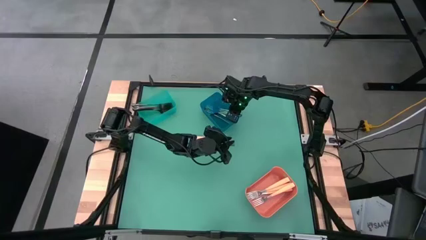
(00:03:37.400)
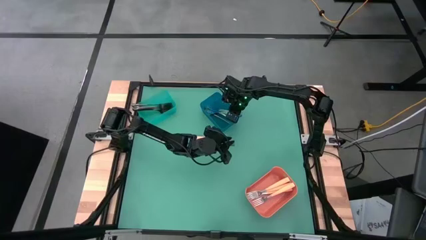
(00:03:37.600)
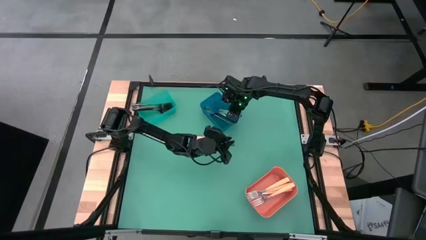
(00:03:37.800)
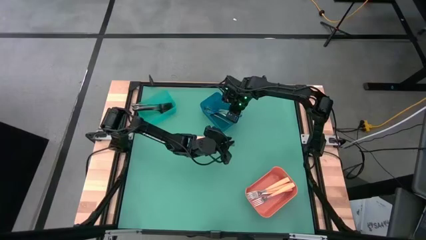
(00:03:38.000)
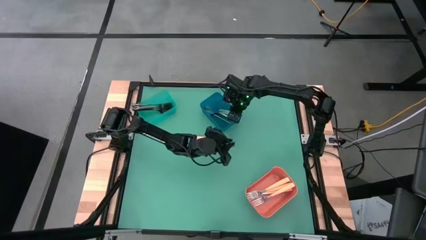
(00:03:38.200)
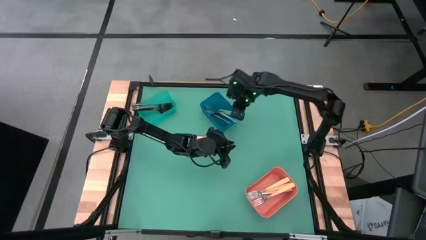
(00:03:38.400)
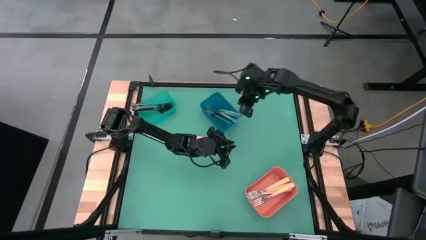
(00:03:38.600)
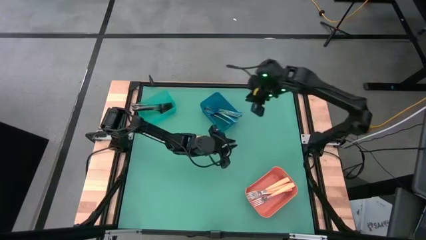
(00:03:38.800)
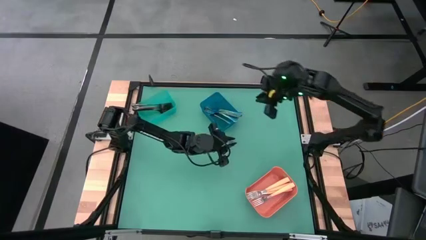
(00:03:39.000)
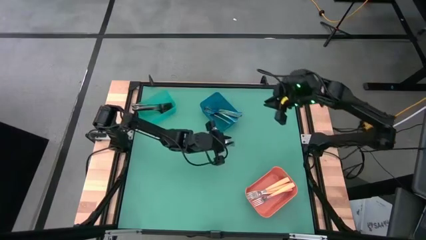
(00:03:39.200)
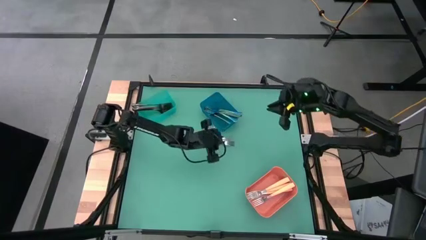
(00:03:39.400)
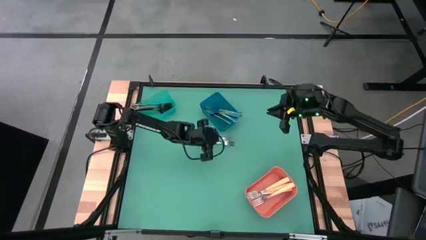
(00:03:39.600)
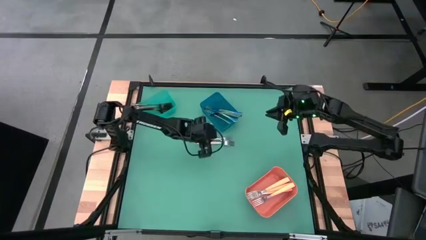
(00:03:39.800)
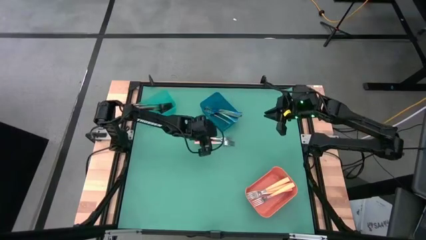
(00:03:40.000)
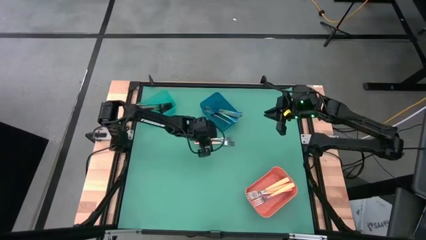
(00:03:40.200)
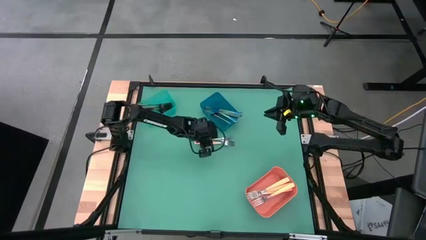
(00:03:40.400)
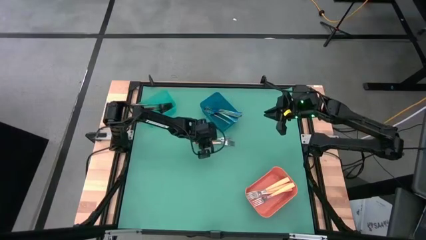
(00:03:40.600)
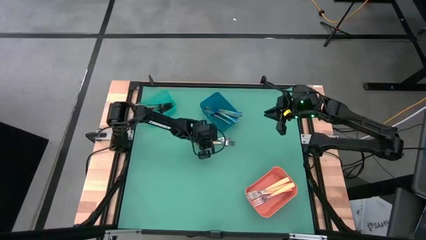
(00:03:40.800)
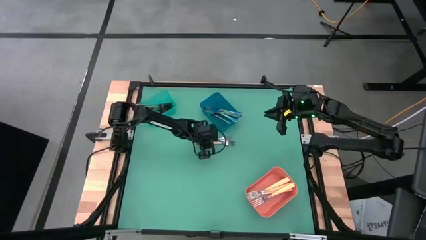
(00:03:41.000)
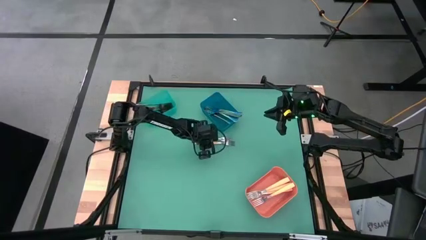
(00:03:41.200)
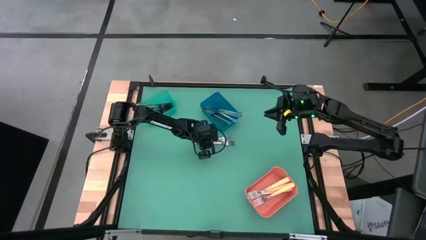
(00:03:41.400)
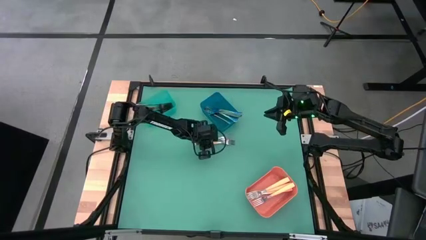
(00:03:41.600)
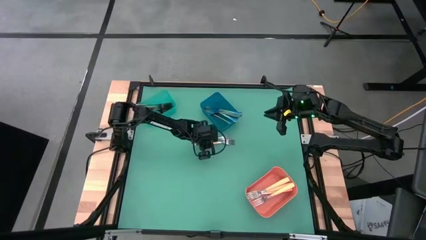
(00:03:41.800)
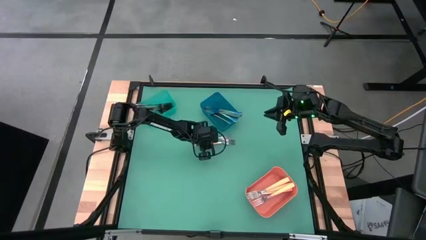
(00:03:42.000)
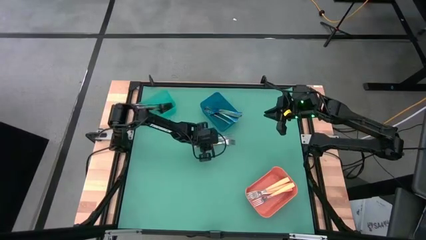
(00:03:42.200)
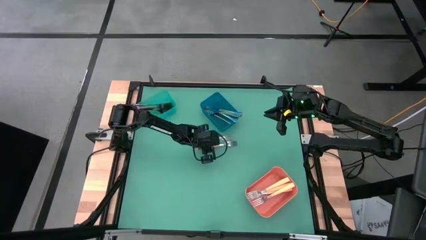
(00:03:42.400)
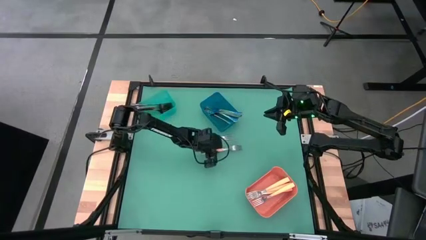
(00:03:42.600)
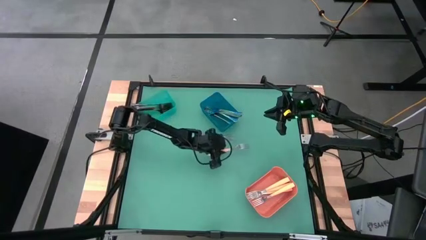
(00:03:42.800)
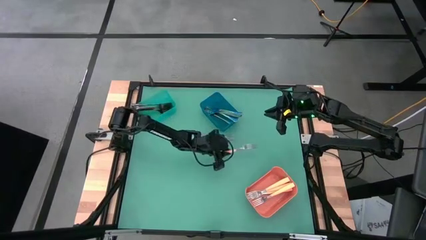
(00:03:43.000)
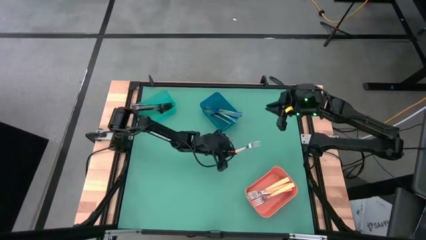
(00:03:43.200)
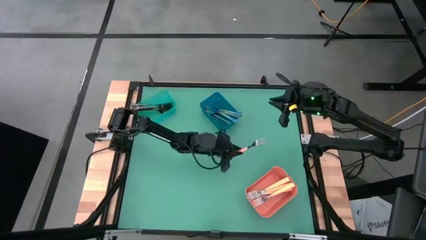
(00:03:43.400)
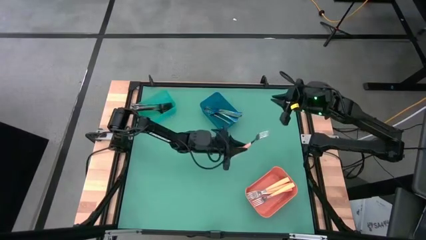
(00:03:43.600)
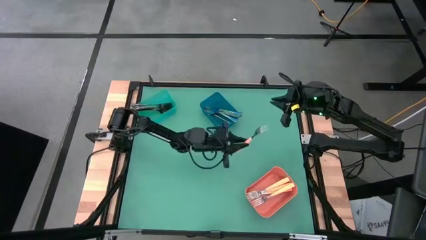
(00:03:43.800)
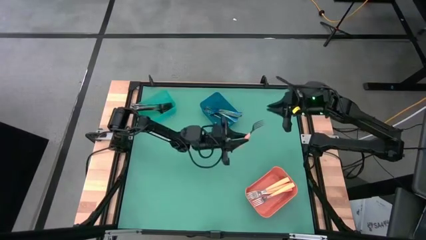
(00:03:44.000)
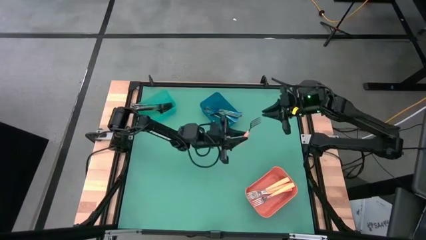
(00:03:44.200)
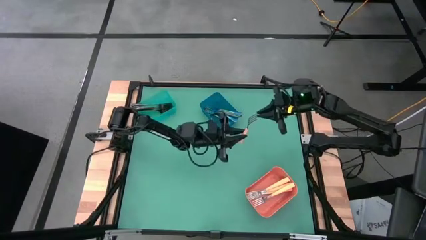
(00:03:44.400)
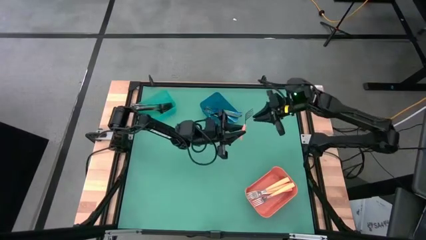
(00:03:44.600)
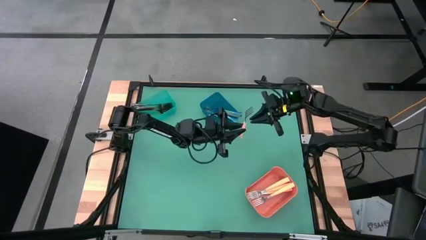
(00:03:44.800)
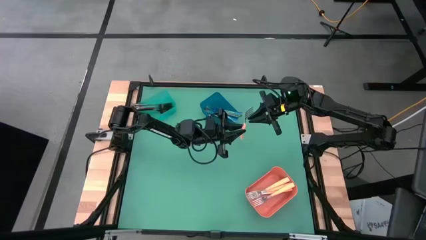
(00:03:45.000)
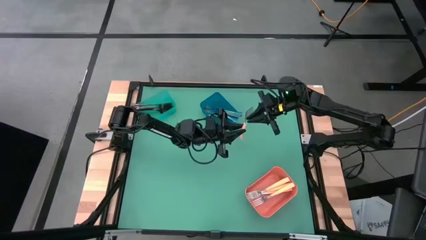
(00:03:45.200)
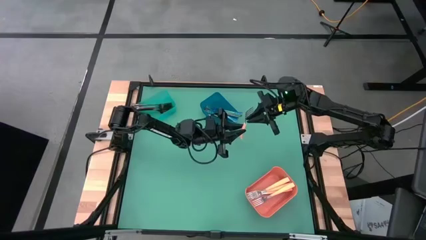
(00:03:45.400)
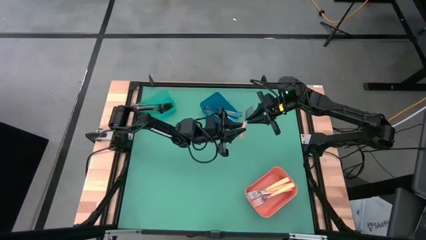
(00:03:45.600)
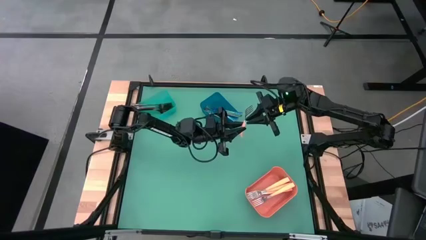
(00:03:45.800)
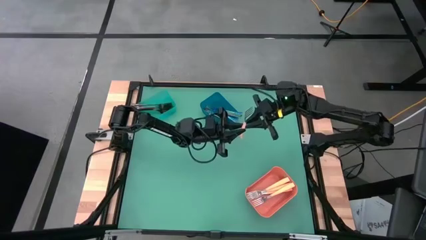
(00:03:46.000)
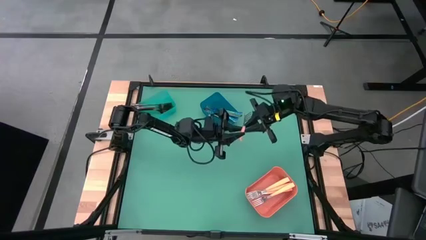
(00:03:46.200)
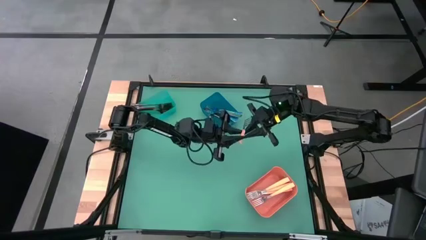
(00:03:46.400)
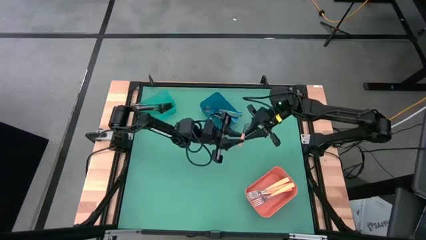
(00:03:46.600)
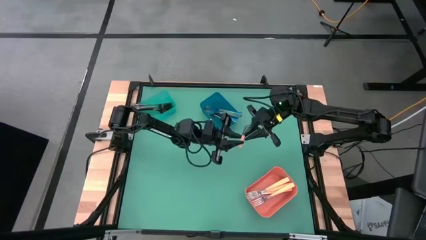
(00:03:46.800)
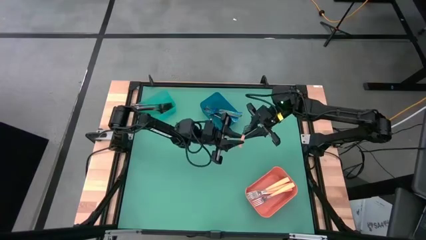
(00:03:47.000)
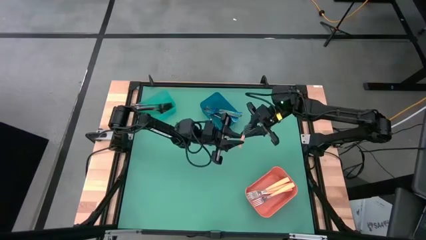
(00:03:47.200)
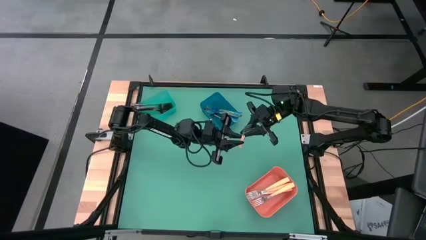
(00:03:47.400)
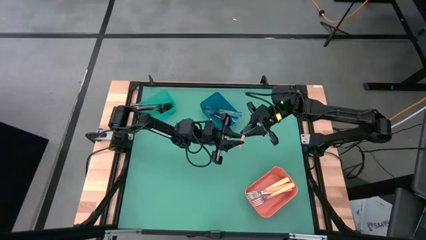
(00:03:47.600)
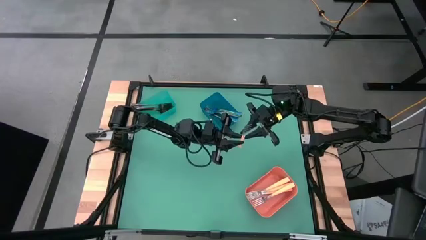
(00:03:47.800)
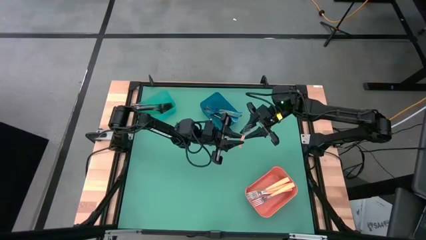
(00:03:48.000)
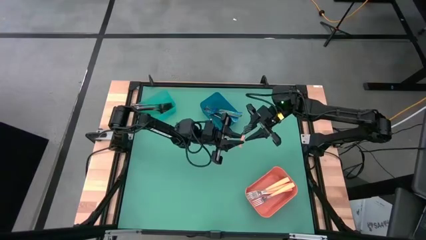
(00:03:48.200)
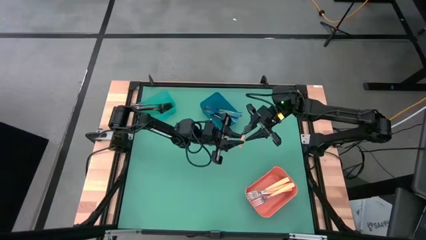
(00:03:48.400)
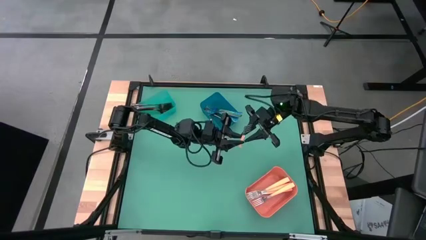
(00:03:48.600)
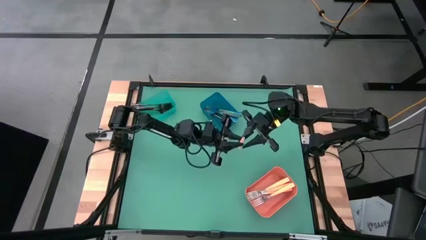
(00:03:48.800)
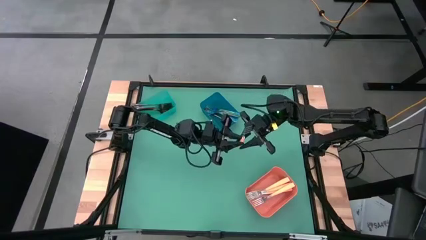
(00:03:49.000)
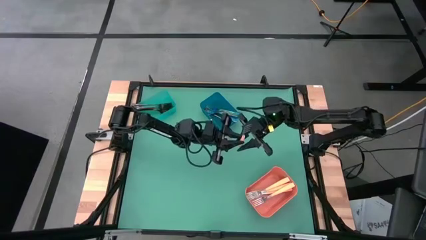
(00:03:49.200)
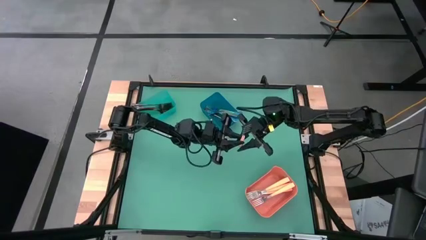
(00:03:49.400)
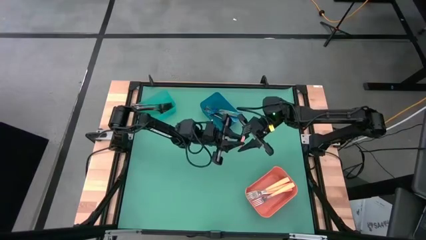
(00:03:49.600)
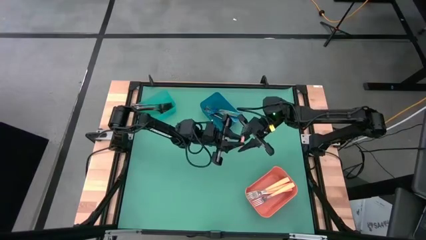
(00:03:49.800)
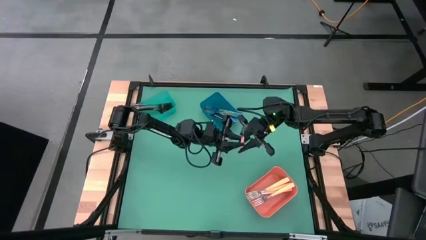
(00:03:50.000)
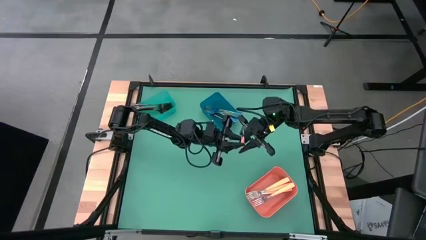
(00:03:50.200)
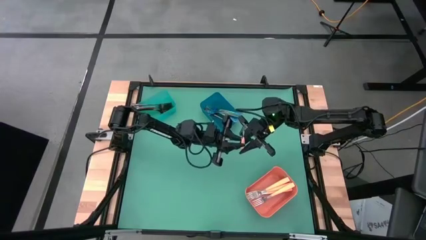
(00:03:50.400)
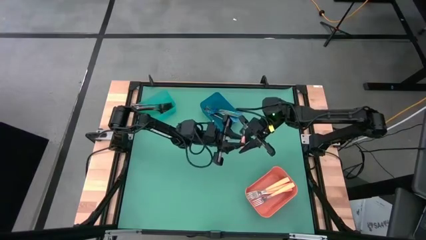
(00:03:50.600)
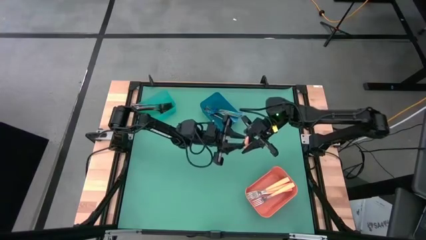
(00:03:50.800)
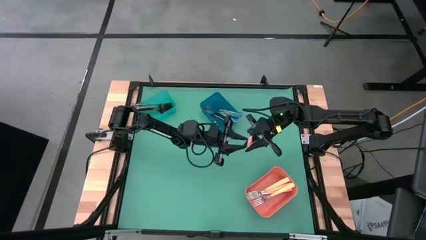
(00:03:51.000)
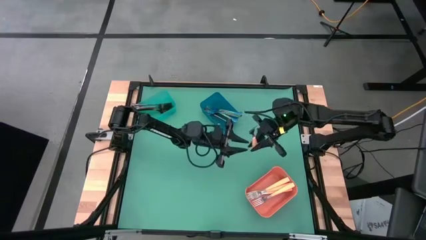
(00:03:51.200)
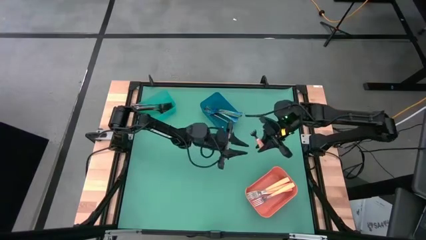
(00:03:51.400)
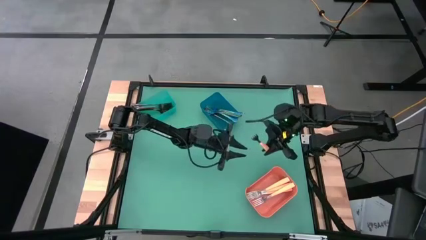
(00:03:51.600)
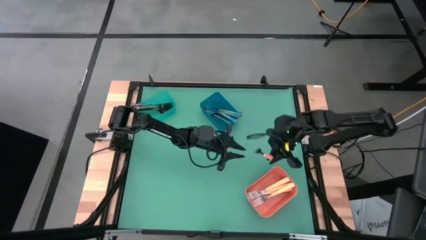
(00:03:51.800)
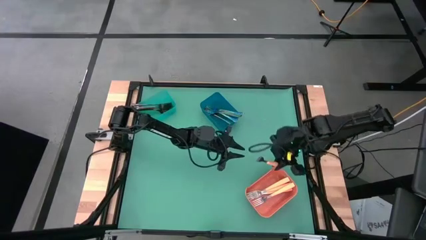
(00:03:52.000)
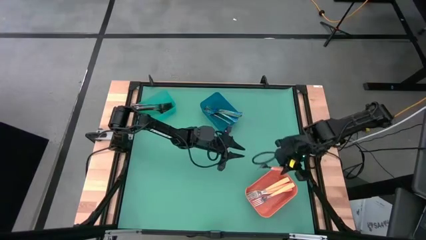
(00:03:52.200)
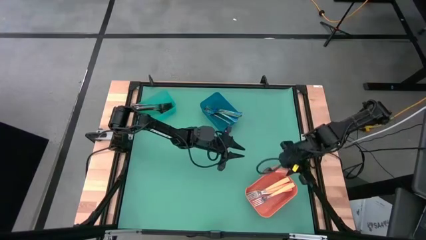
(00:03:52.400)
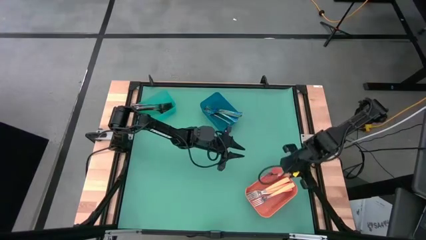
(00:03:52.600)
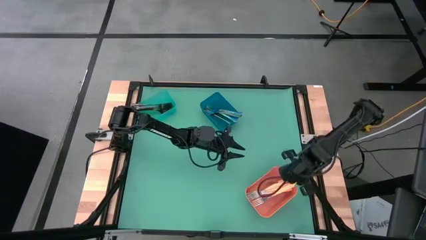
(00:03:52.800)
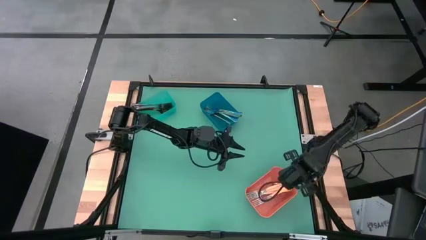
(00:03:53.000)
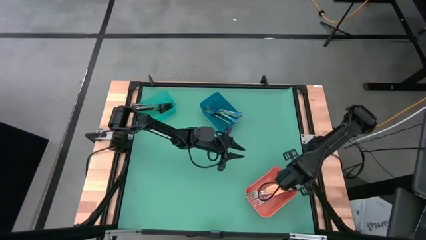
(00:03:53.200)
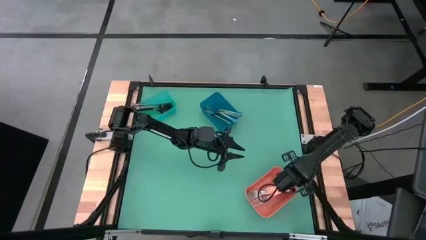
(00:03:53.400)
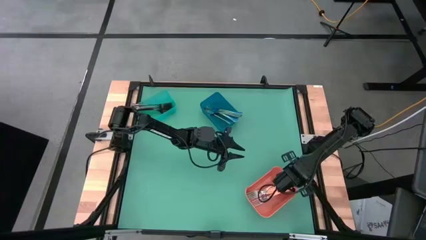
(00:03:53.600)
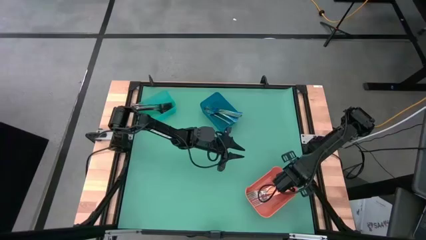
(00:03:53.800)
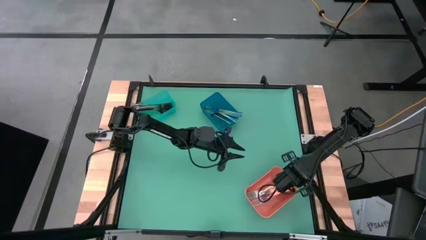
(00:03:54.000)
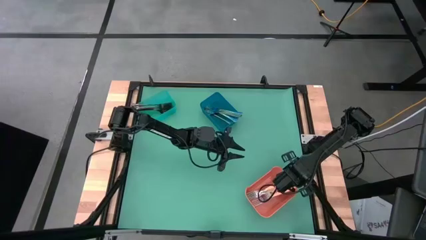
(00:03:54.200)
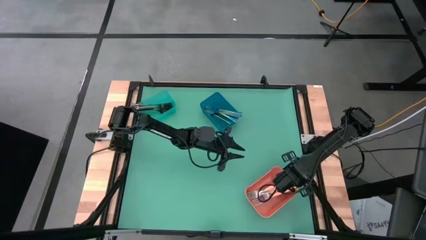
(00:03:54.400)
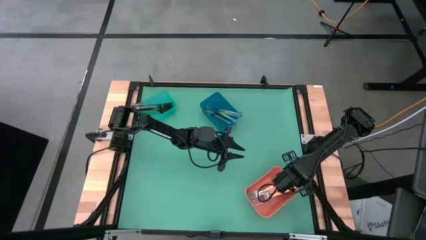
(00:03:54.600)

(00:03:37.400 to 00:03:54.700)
Task: Sort silverware by color (type)
Put the orange fork into the orange bin
